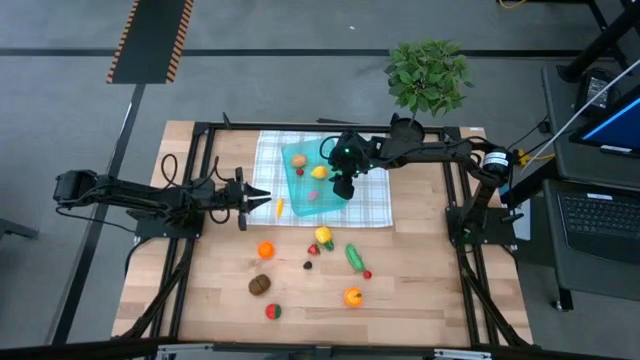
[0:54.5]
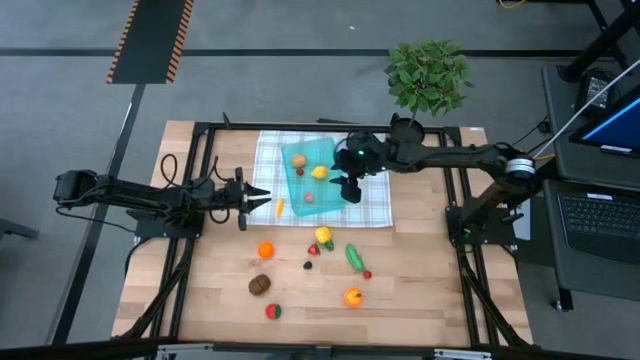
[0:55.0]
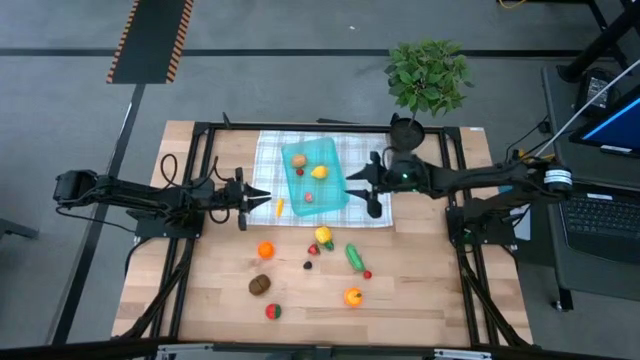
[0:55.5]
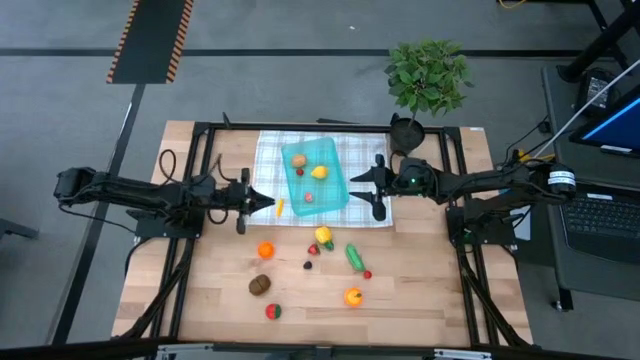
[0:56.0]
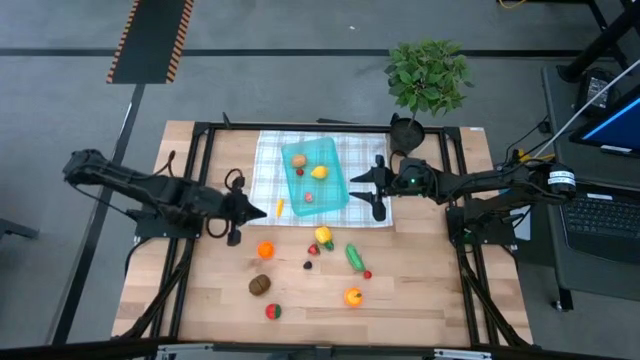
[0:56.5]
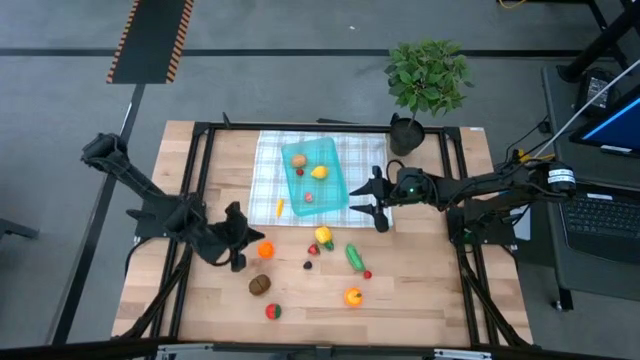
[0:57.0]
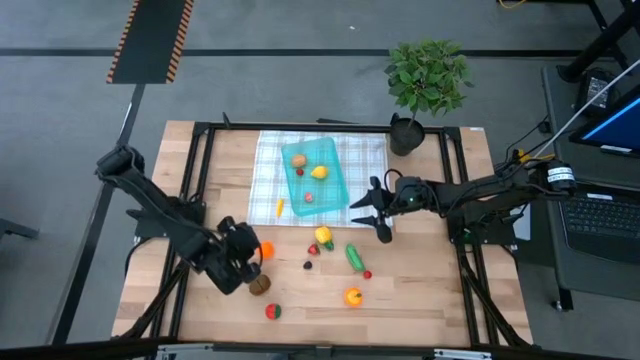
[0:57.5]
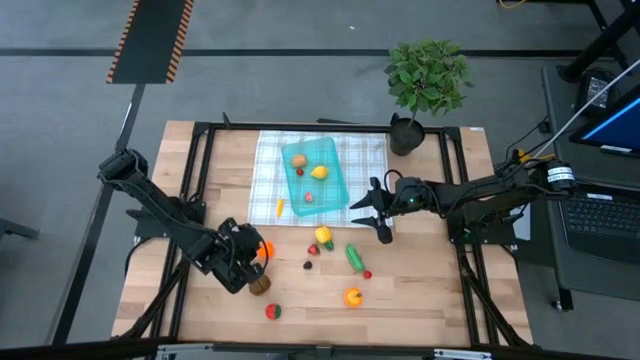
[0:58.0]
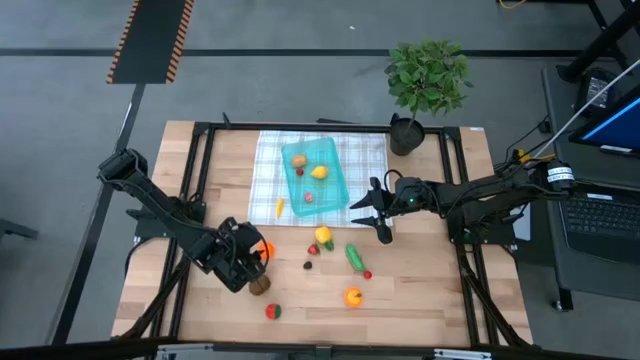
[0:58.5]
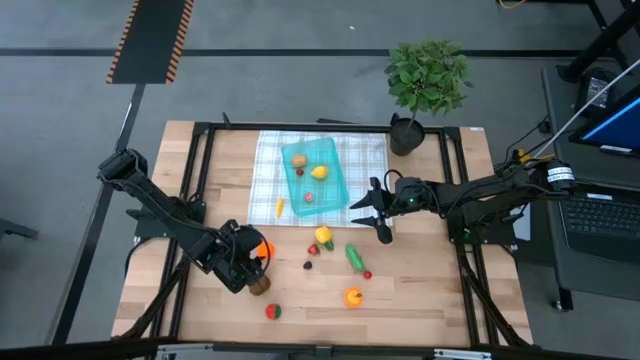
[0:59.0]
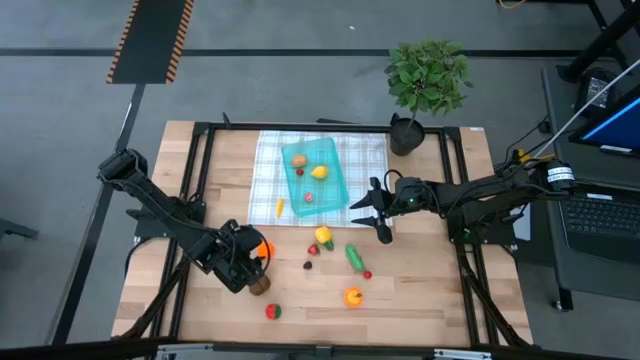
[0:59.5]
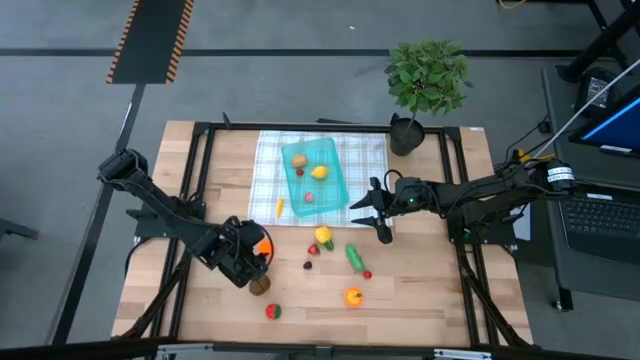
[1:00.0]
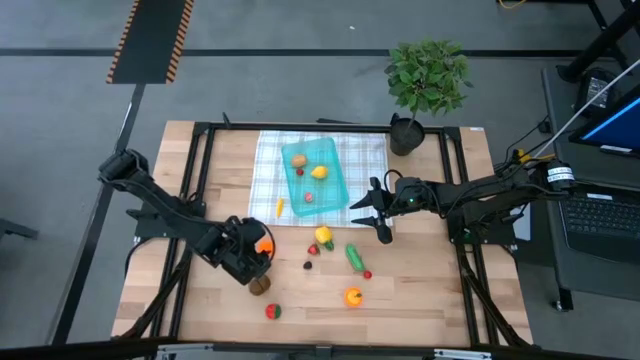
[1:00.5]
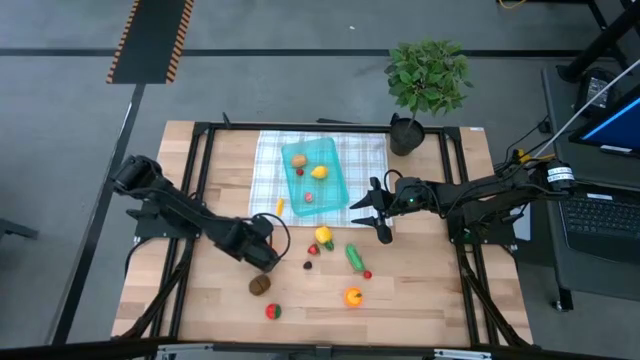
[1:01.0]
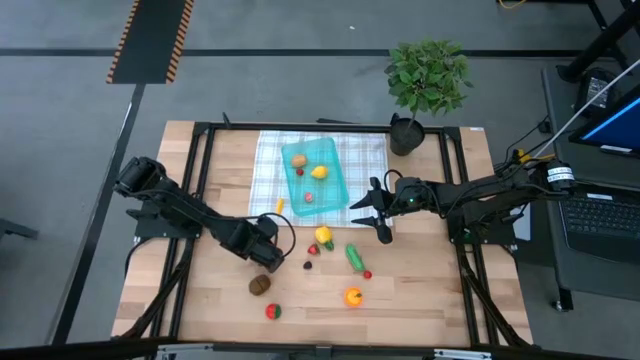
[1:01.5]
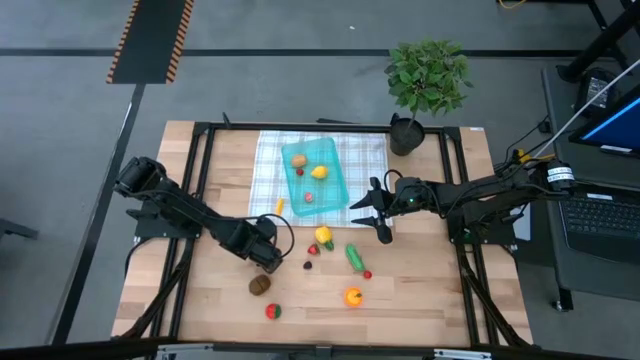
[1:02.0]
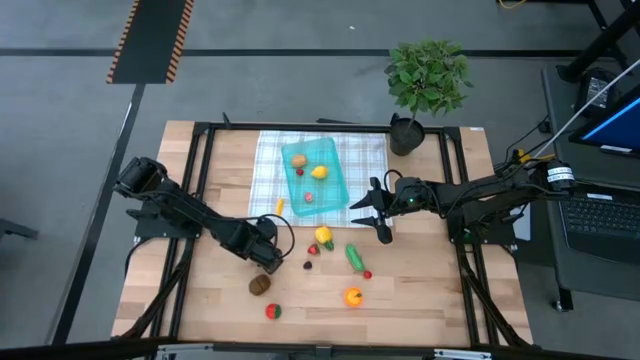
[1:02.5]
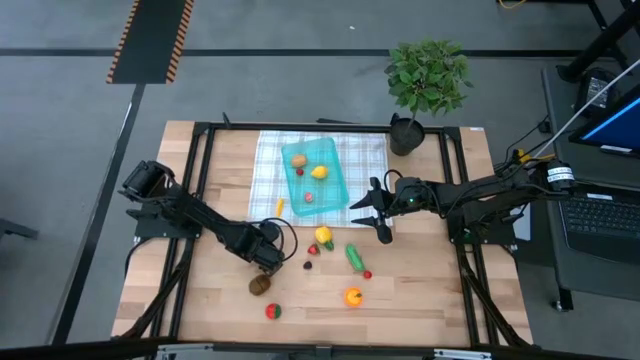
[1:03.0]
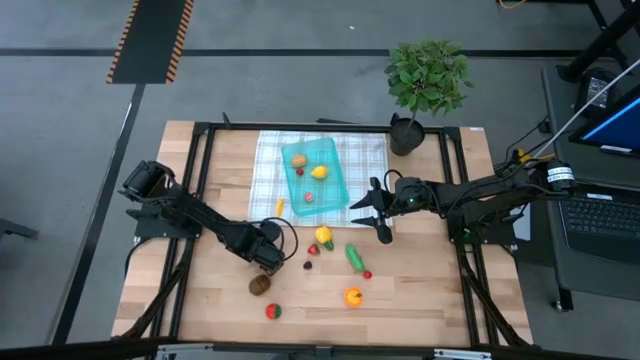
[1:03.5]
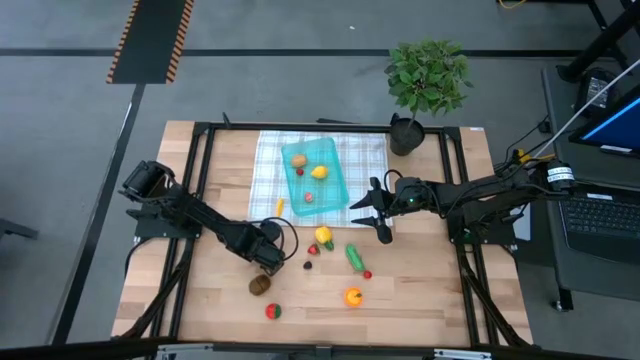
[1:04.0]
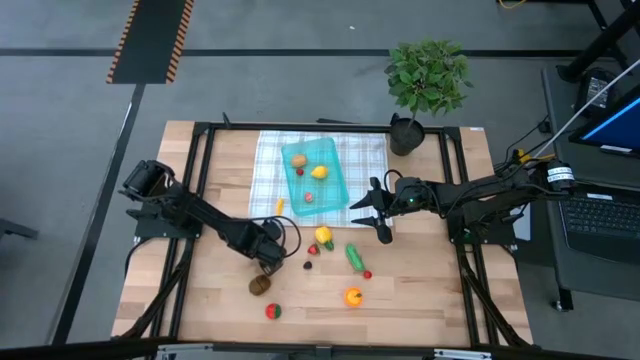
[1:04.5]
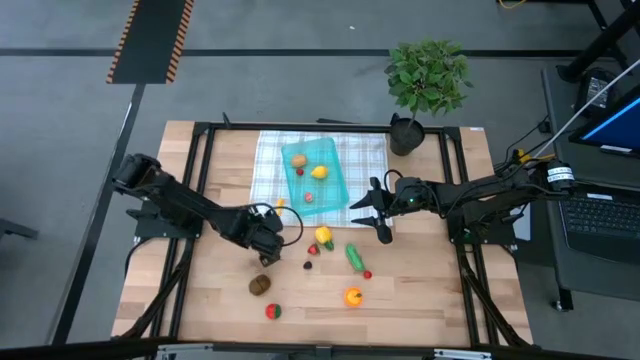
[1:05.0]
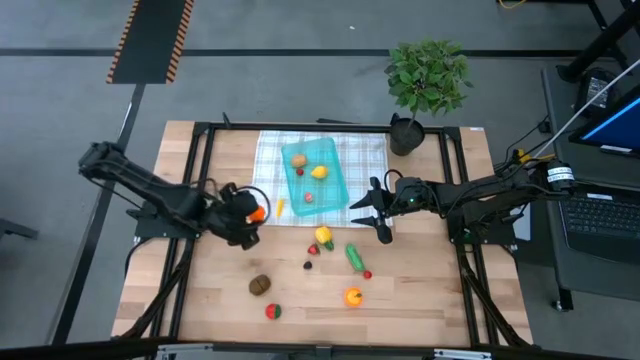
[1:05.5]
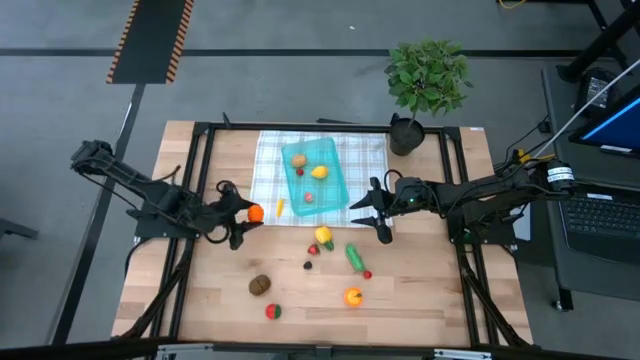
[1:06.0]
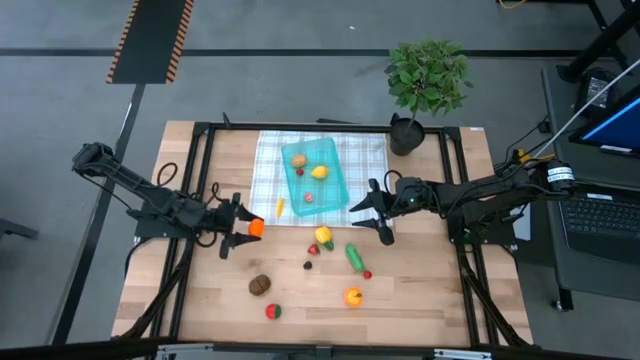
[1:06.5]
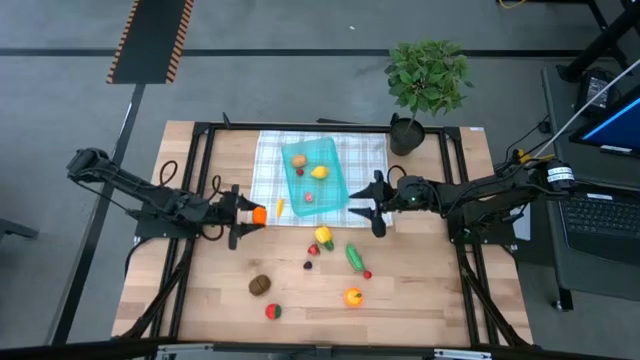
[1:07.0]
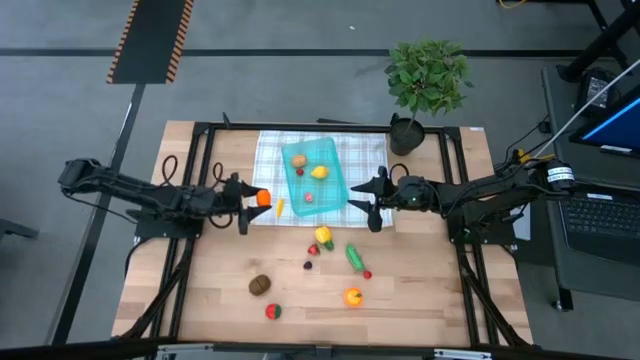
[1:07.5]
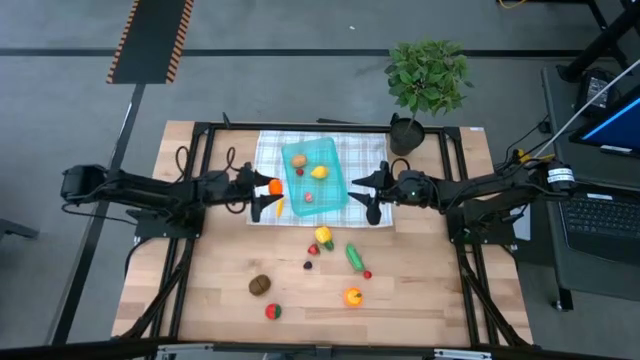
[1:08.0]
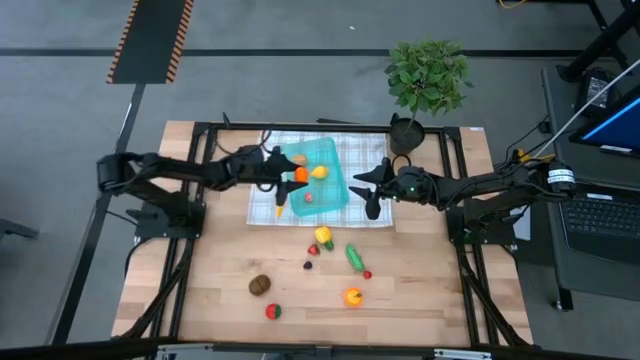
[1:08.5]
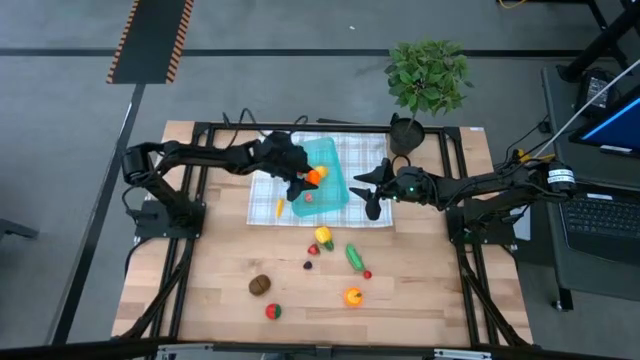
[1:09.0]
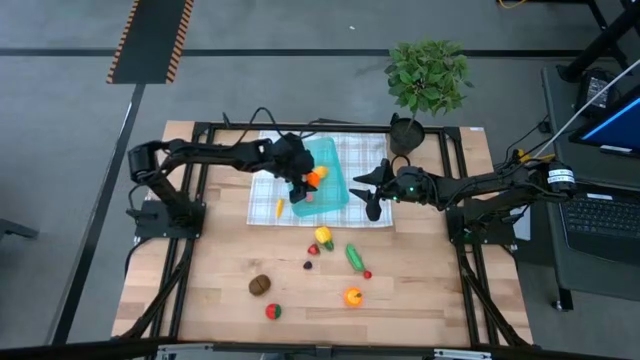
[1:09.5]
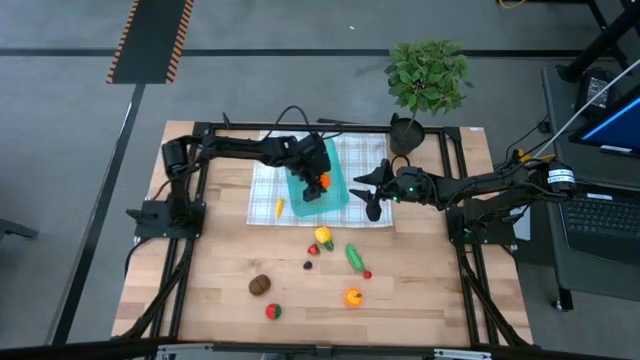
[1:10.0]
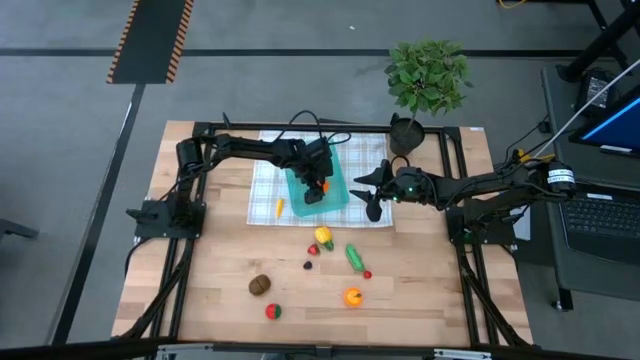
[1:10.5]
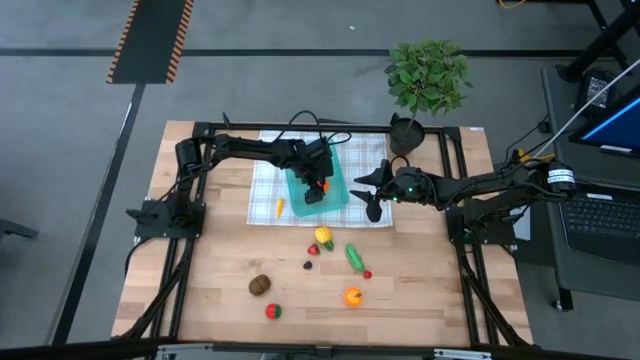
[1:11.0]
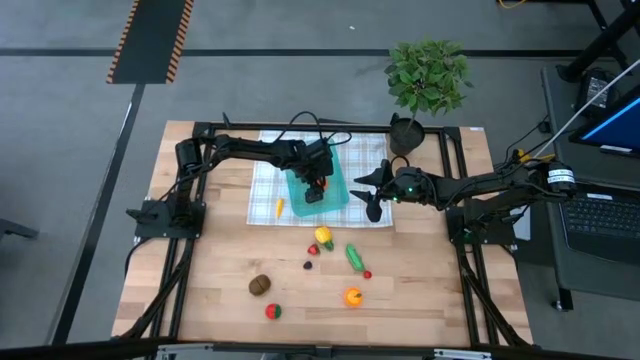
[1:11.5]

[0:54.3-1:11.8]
Task: Pick and placing Produce into tupperware
Put the orange tangerine into the blue bin
